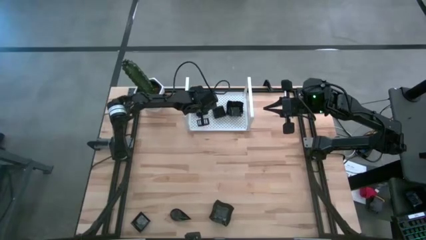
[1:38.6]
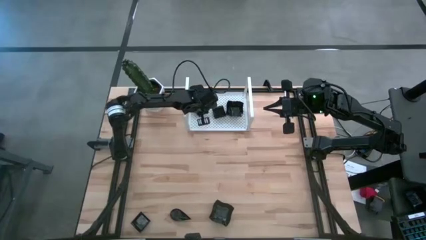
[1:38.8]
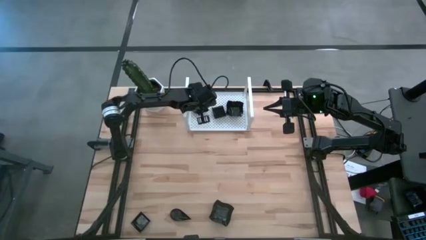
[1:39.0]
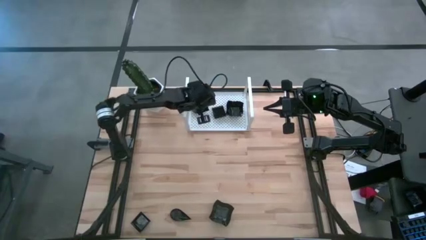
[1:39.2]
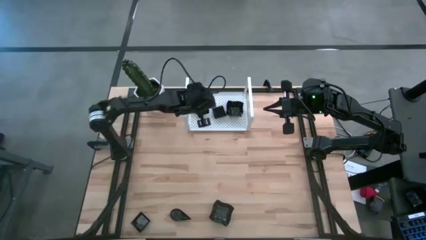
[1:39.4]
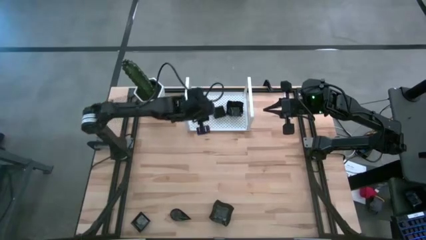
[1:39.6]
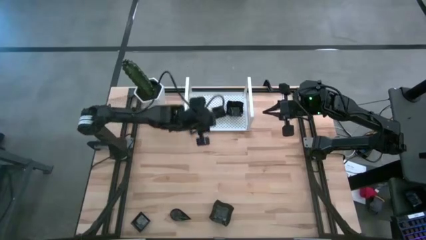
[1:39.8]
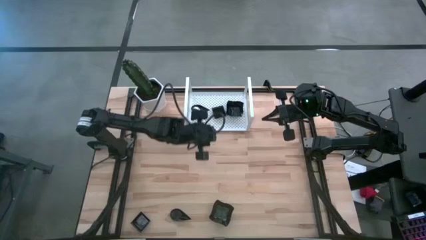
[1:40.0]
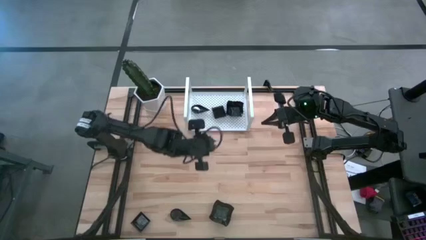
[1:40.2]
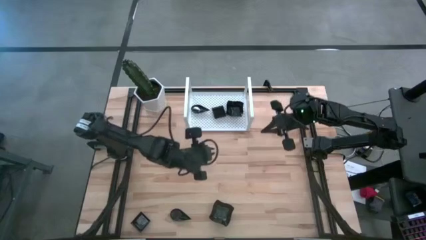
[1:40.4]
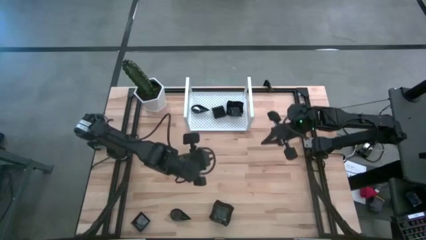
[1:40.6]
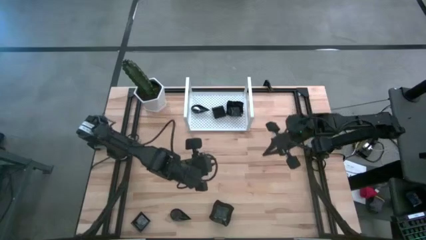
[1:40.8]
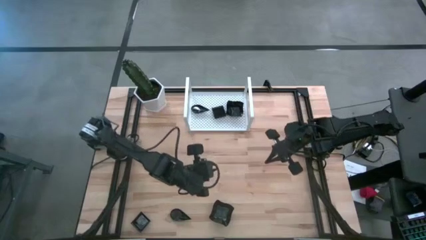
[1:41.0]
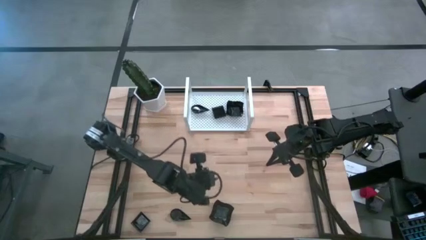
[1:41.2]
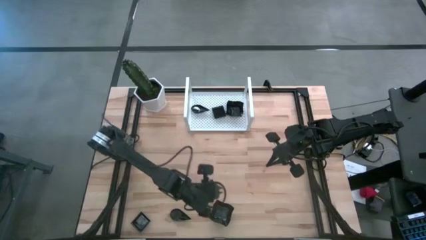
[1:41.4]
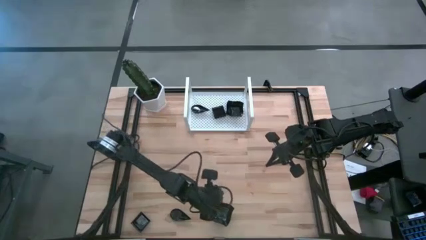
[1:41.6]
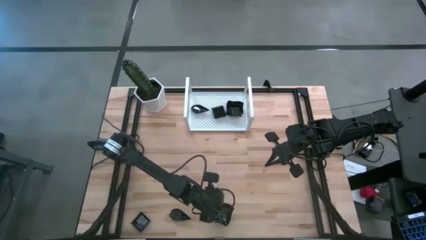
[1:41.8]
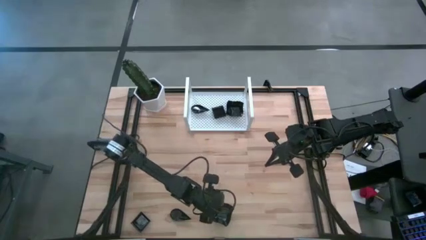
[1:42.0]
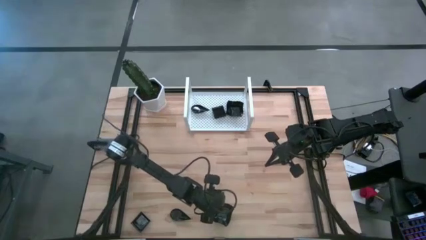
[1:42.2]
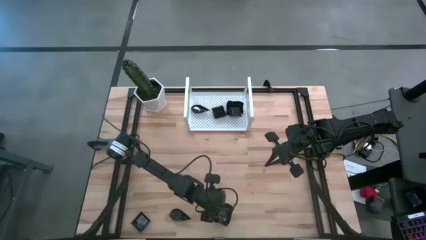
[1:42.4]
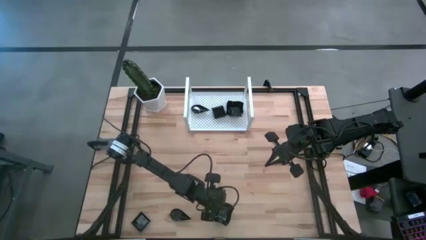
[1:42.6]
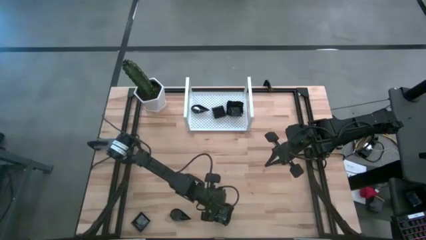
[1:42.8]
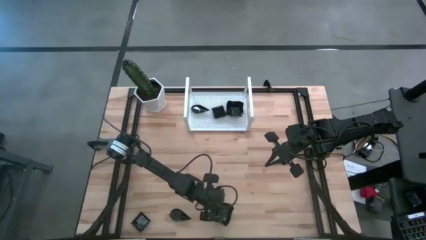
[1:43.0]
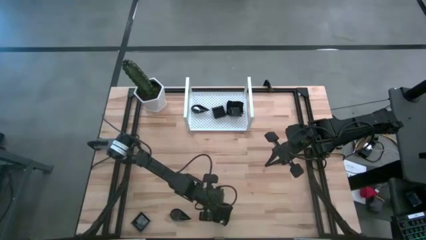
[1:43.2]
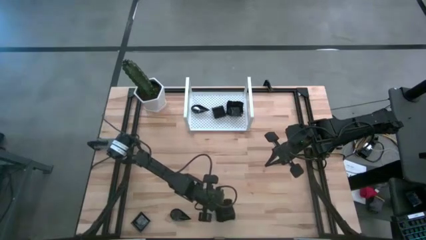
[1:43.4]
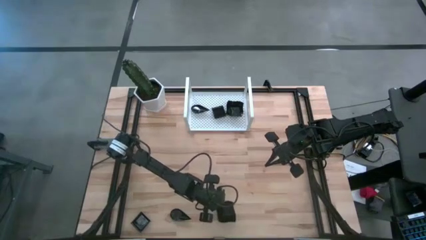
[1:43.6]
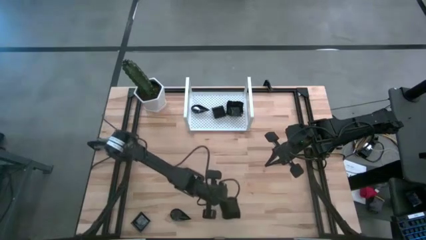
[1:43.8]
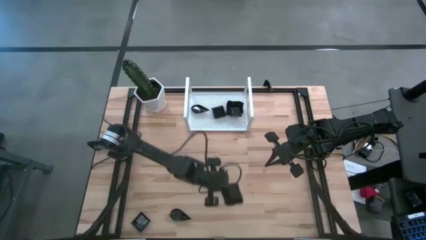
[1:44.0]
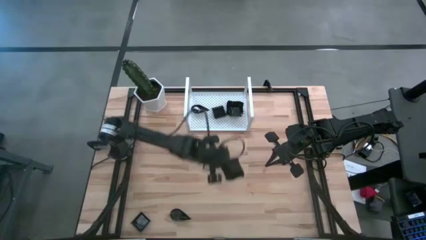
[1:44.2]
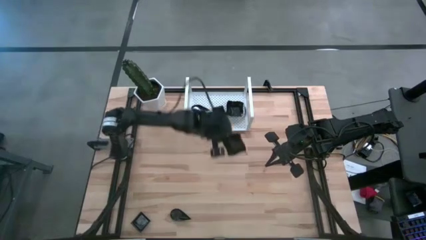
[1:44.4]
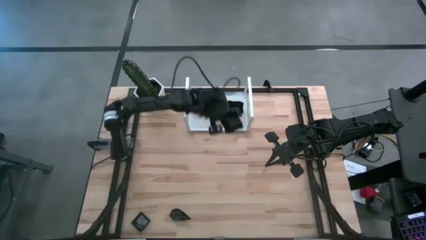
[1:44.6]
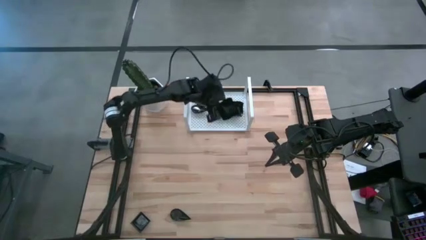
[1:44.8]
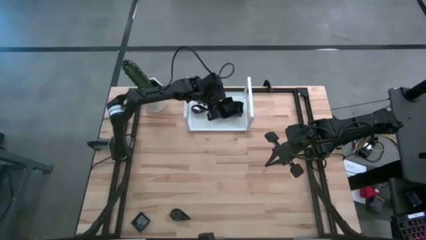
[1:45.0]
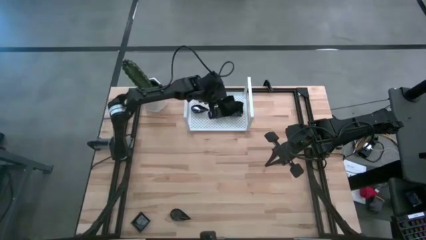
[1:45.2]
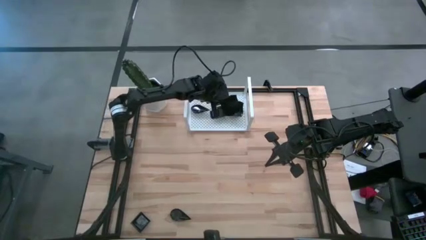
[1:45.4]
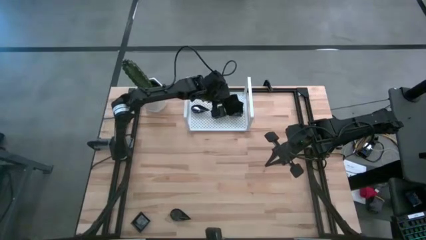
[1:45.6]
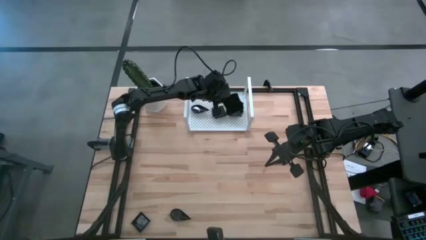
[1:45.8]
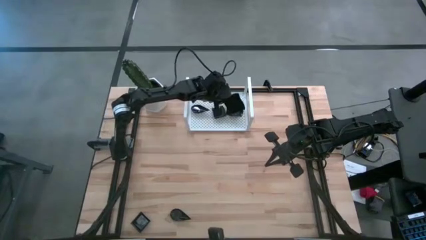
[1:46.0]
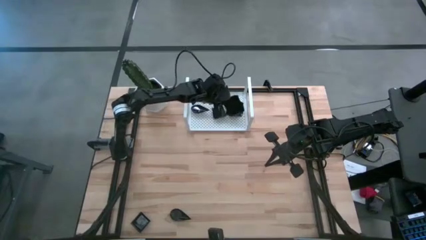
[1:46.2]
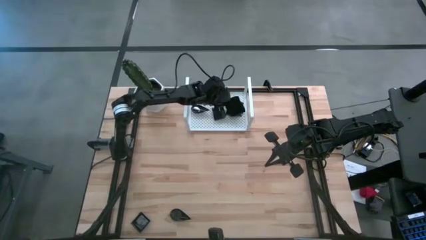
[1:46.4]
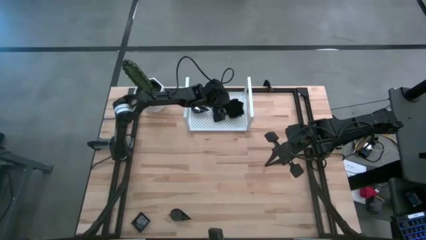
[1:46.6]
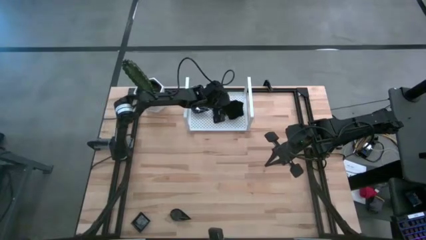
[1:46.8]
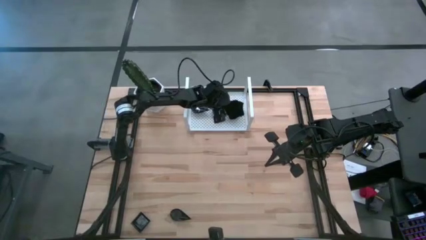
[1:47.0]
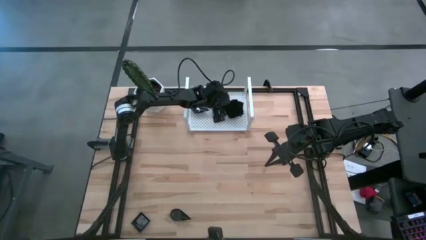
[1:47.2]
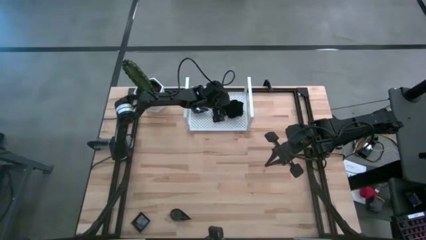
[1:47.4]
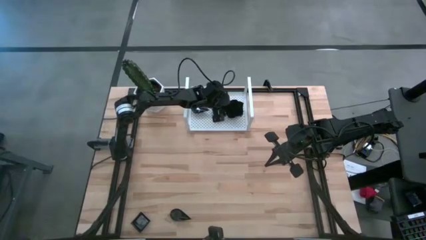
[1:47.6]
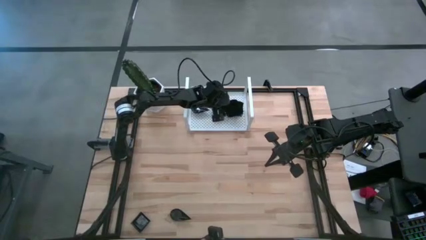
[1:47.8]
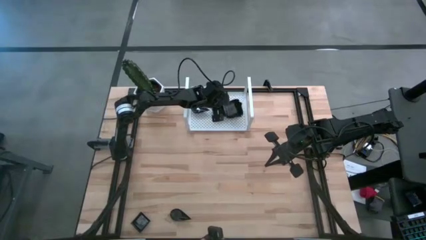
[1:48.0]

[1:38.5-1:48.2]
Task: Pick & Place Mini shaped plates
Stack the black distorted square plate on top of the black distorted square plate on the shelf

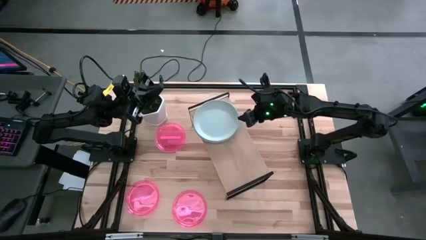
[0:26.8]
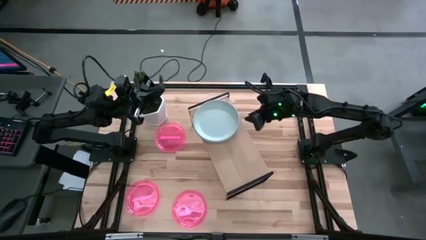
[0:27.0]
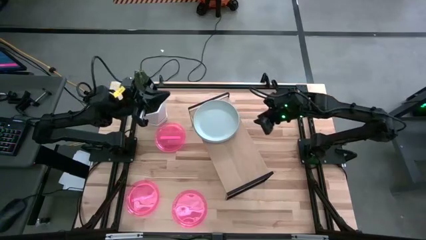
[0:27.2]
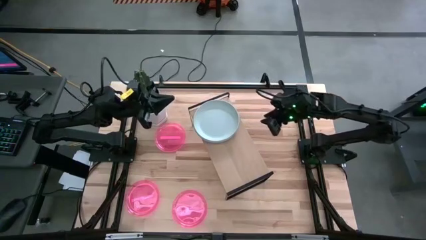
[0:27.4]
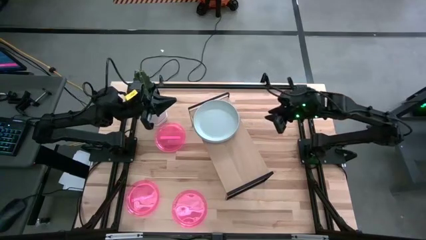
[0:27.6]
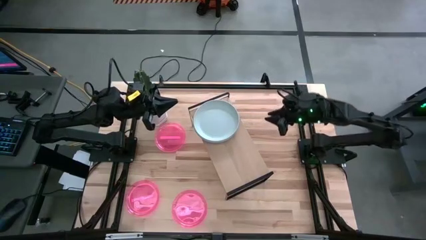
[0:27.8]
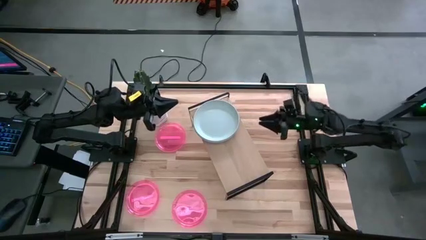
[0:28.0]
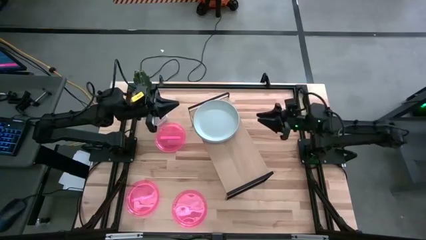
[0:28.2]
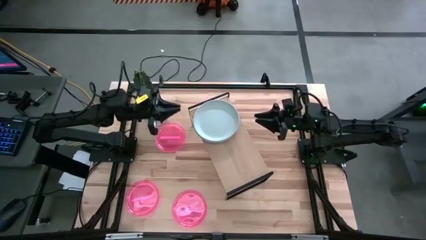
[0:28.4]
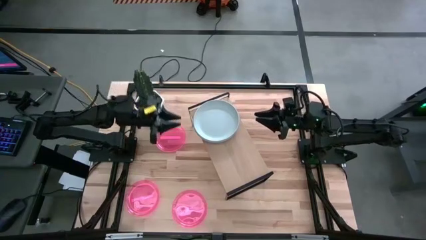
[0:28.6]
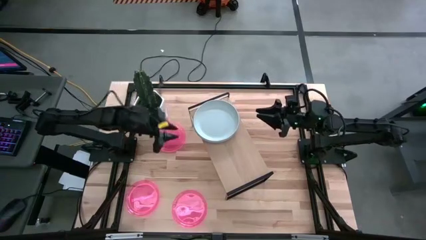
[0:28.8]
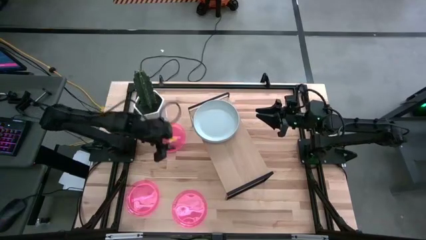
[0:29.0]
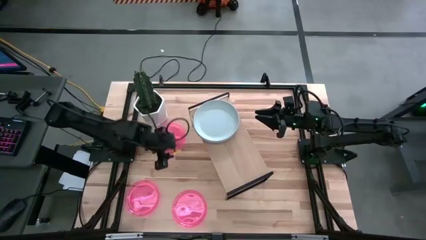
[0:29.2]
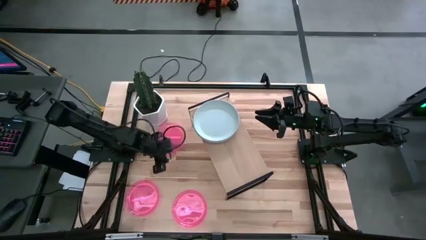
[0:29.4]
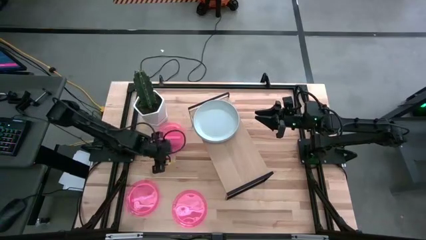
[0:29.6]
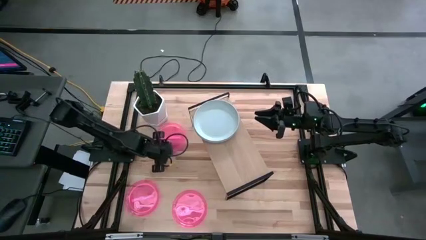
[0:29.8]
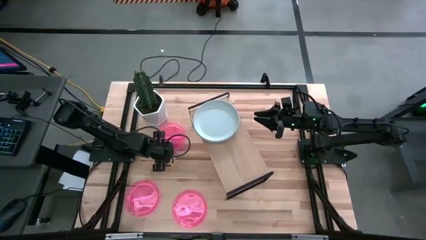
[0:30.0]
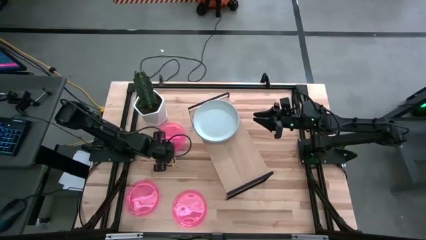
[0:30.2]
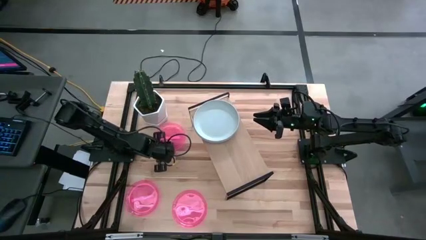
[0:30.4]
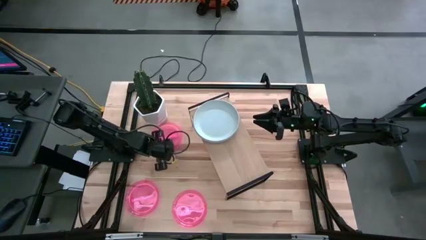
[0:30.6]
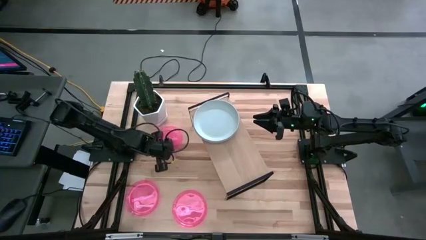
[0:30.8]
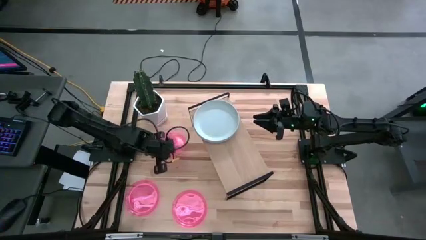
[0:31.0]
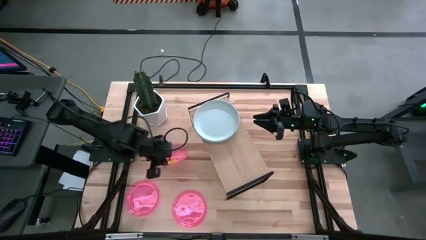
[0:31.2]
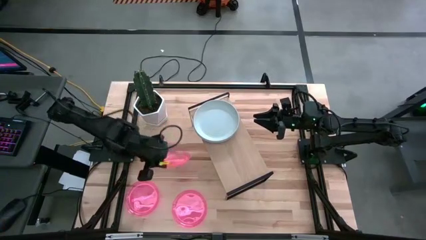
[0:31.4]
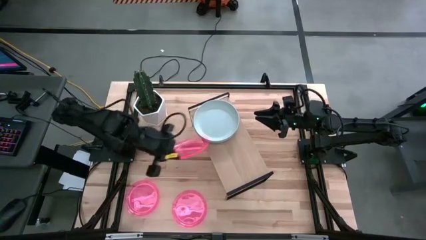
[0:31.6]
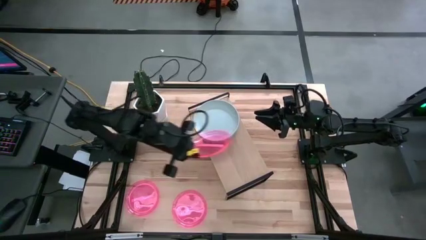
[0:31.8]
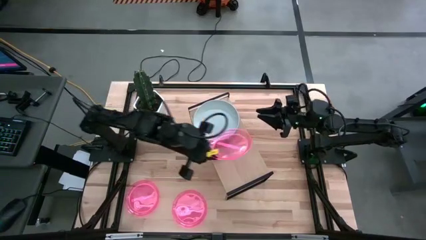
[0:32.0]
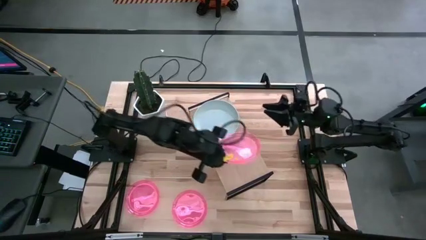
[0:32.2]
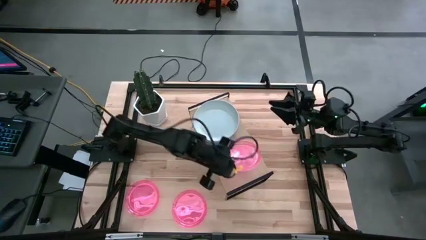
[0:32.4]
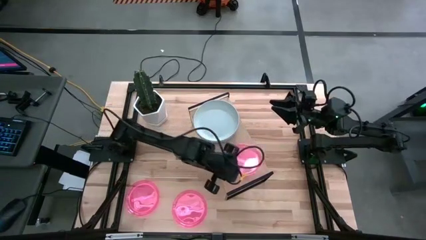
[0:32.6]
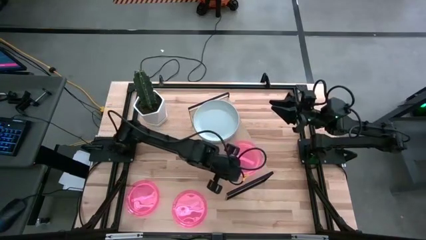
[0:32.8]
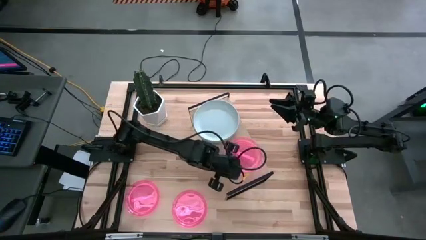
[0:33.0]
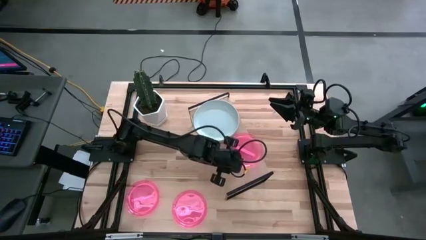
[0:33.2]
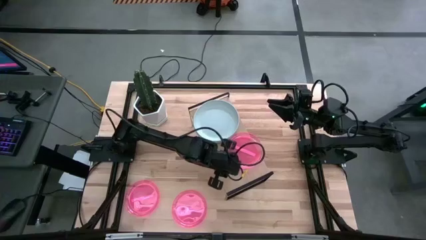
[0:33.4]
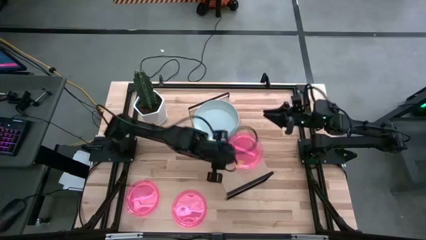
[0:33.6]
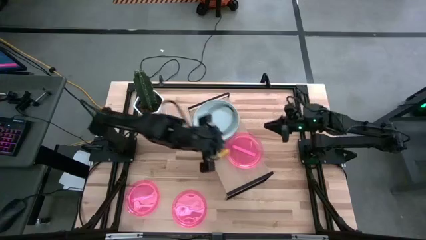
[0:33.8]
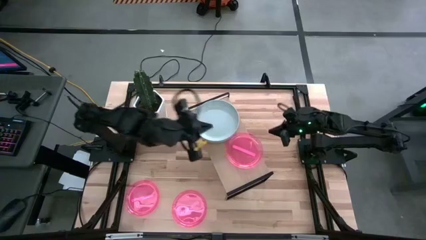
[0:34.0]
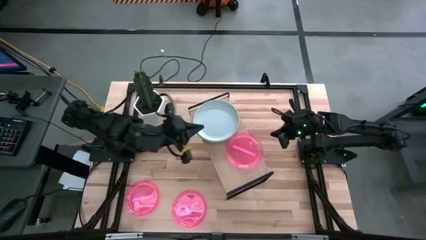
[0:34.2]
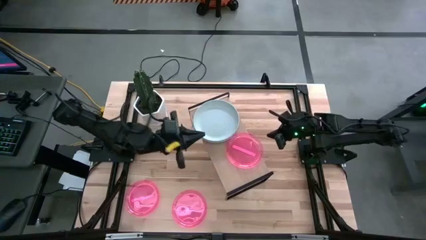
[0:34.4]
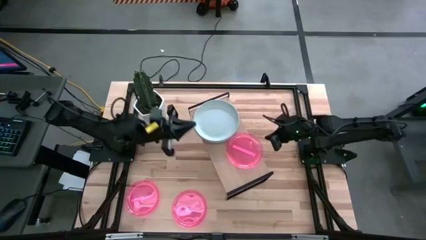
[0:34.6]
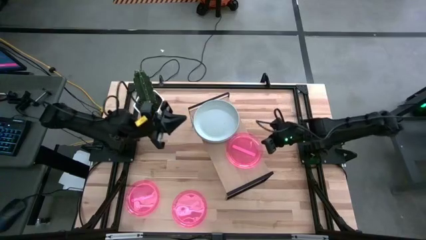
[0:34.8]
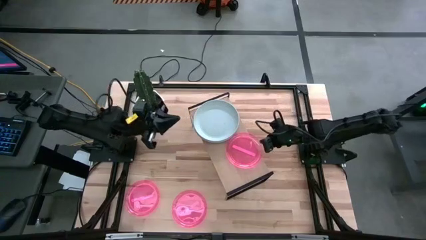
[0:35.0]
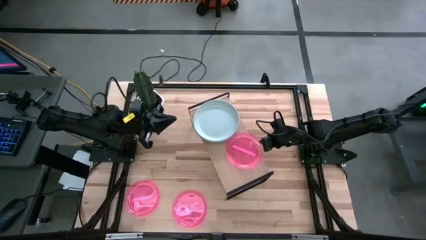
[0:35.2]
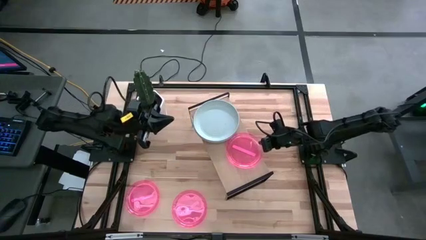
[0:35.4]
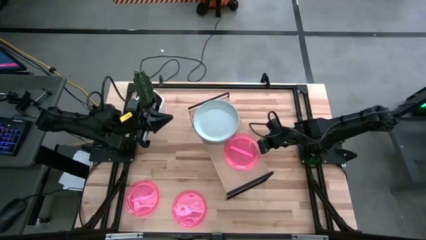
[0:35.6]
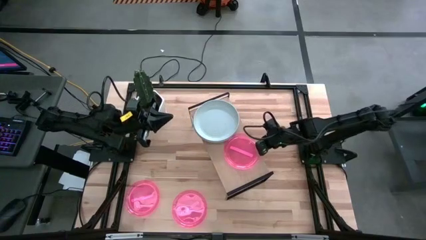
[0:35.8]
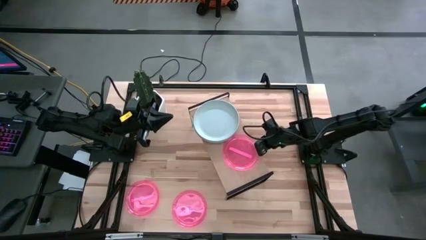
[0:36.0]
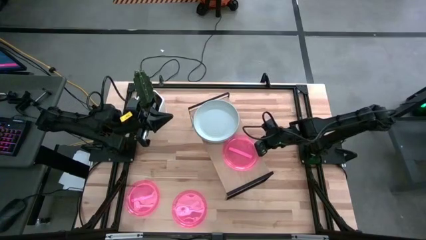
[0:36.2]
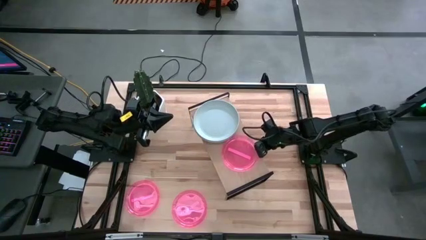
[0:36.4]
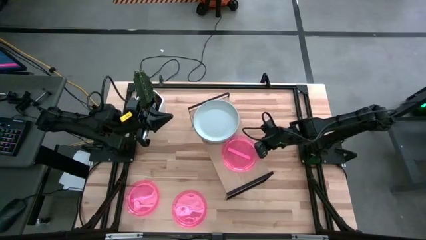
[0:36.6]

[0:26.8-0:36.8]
Task: Place and stack plates onto a shelf
Put the top pink transparent plate on the shelf
